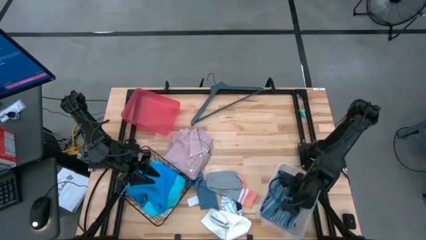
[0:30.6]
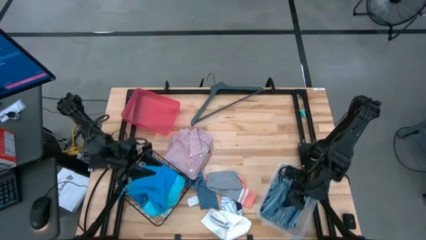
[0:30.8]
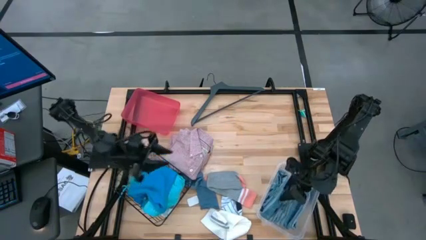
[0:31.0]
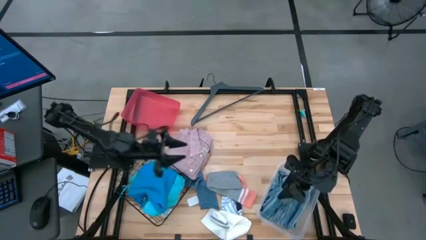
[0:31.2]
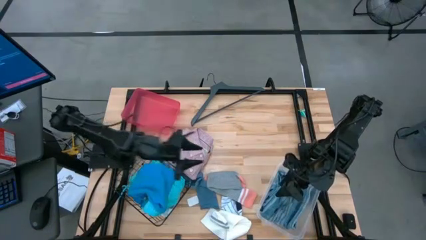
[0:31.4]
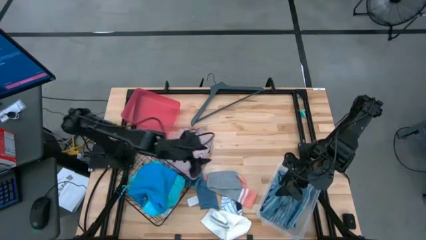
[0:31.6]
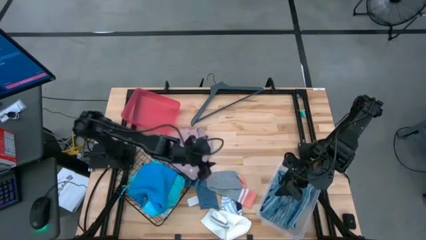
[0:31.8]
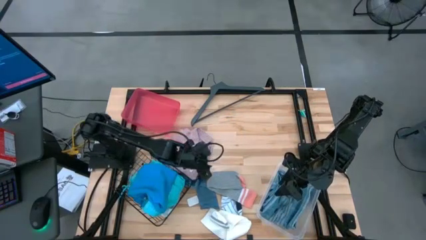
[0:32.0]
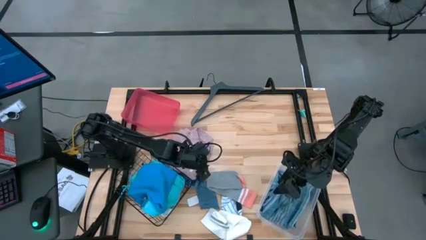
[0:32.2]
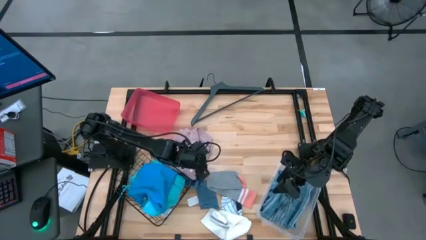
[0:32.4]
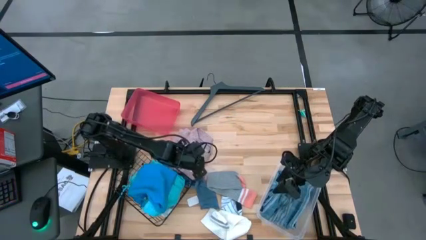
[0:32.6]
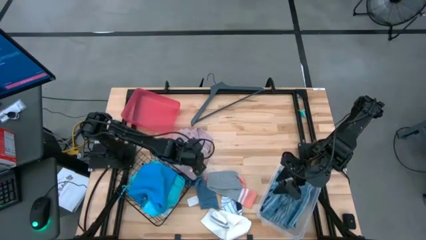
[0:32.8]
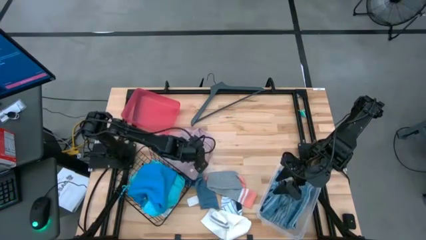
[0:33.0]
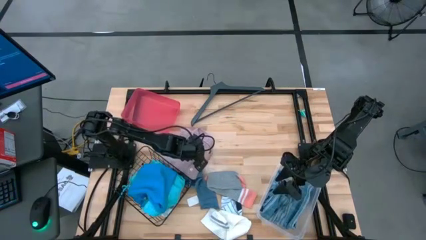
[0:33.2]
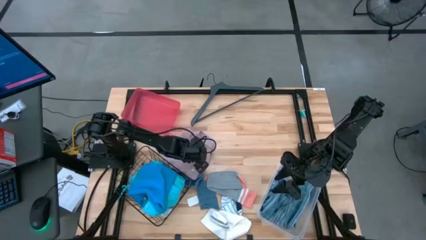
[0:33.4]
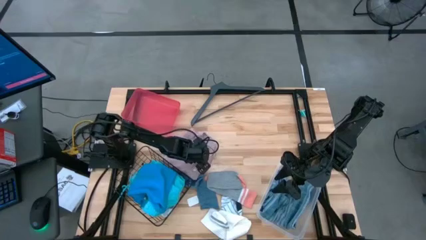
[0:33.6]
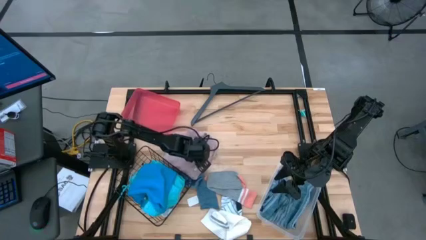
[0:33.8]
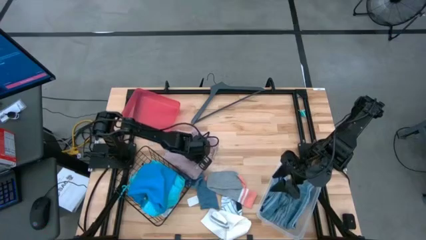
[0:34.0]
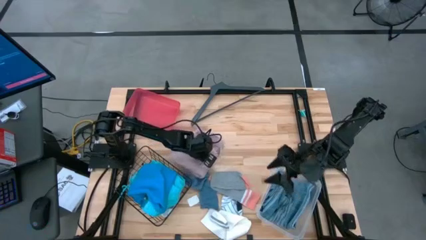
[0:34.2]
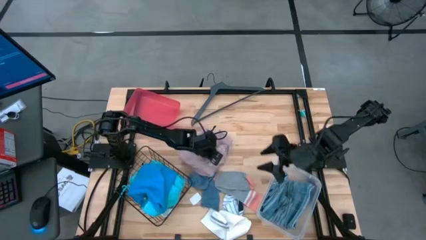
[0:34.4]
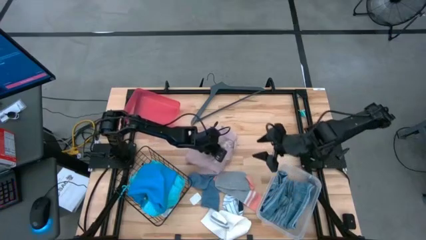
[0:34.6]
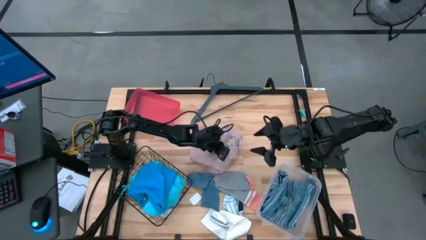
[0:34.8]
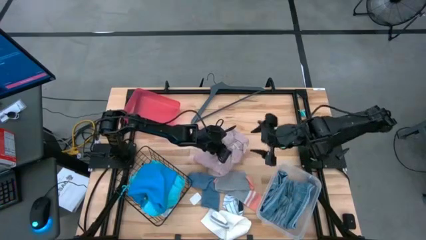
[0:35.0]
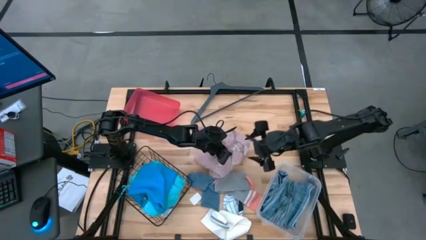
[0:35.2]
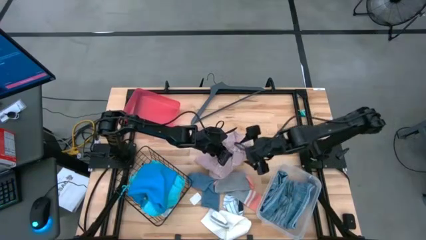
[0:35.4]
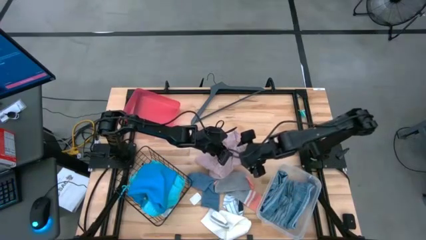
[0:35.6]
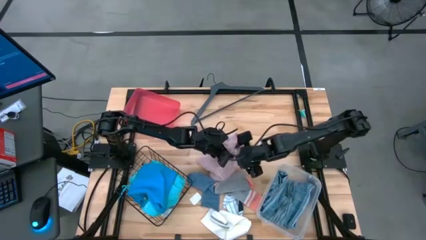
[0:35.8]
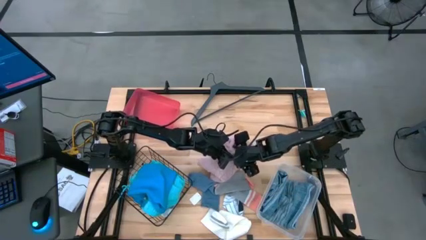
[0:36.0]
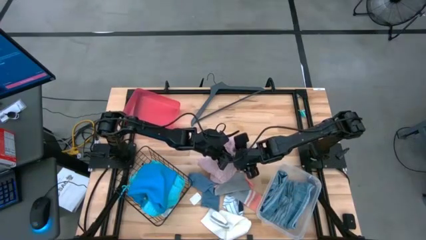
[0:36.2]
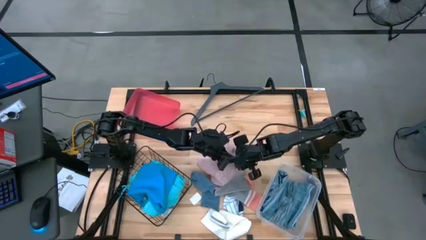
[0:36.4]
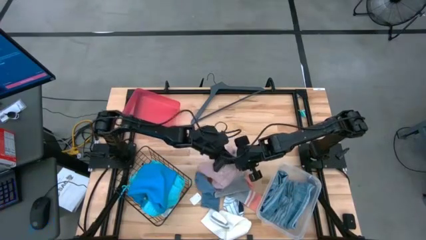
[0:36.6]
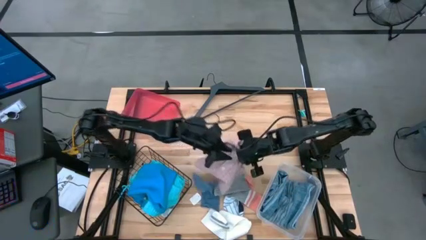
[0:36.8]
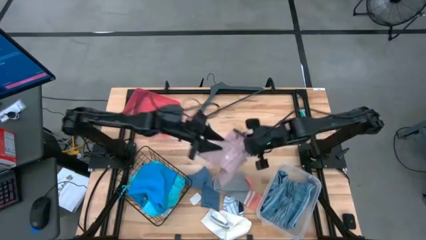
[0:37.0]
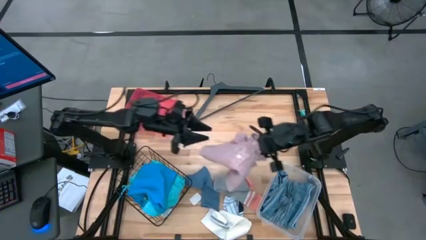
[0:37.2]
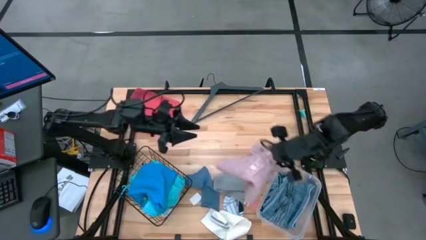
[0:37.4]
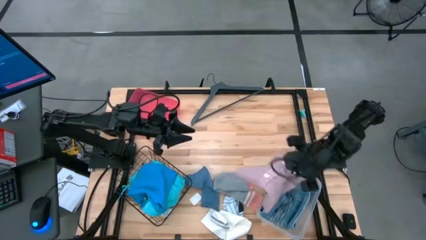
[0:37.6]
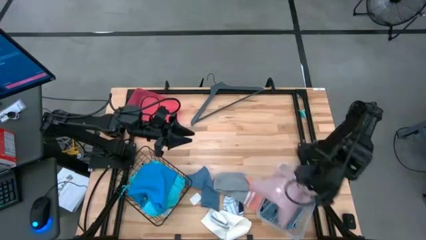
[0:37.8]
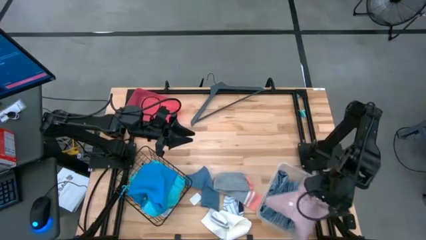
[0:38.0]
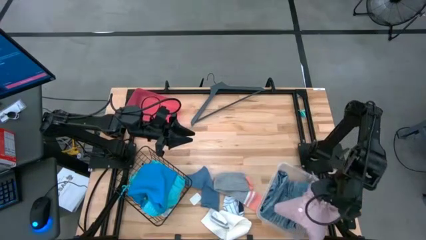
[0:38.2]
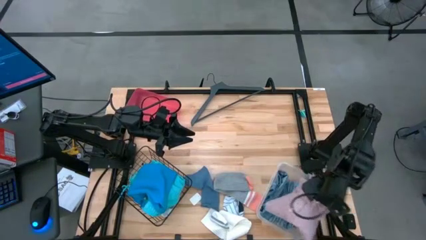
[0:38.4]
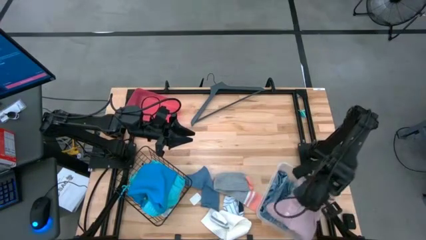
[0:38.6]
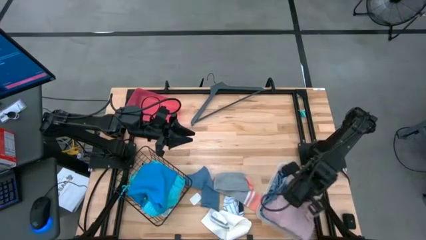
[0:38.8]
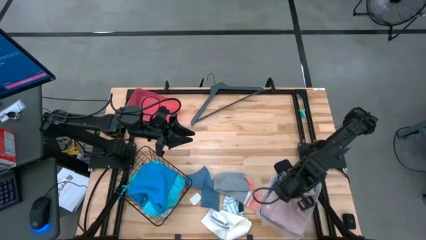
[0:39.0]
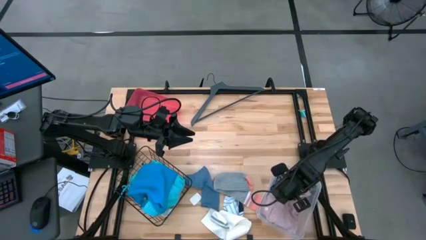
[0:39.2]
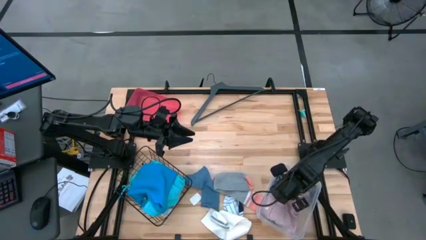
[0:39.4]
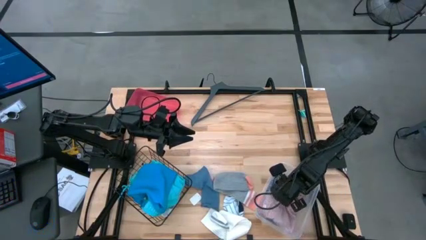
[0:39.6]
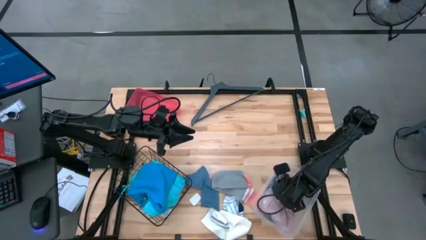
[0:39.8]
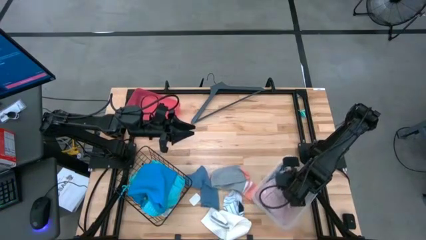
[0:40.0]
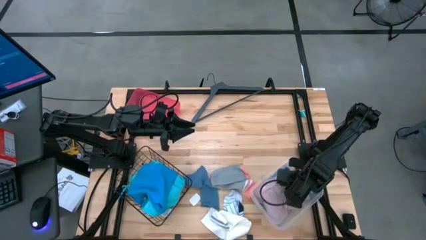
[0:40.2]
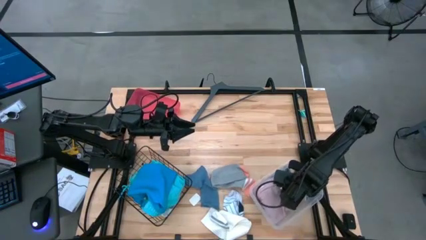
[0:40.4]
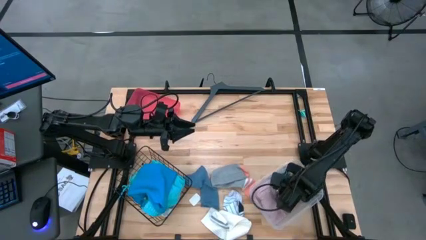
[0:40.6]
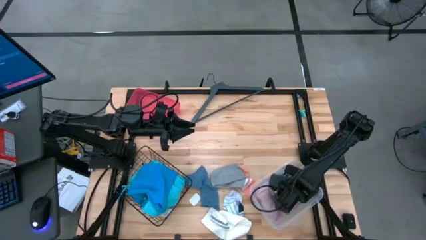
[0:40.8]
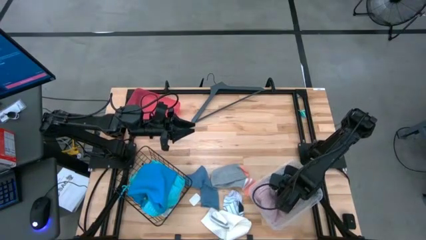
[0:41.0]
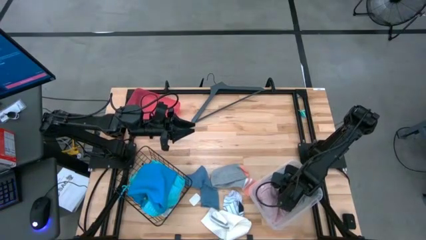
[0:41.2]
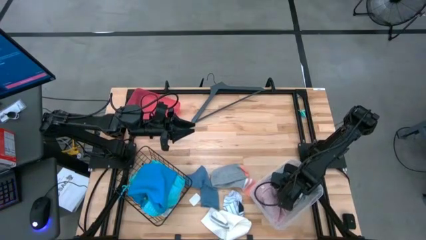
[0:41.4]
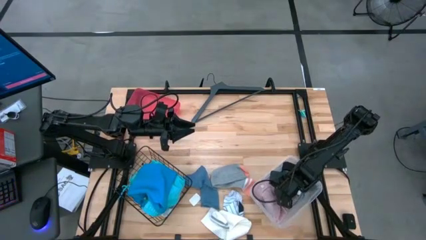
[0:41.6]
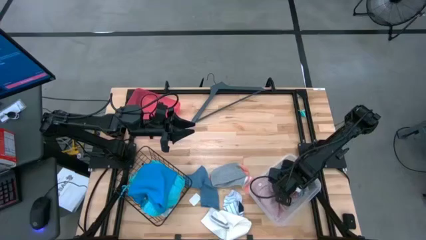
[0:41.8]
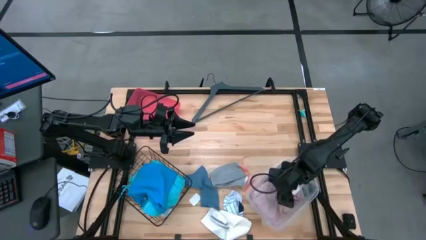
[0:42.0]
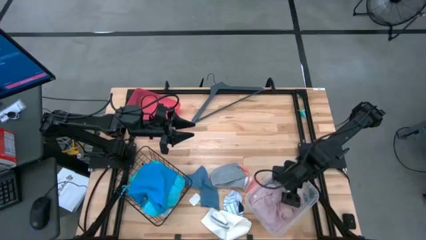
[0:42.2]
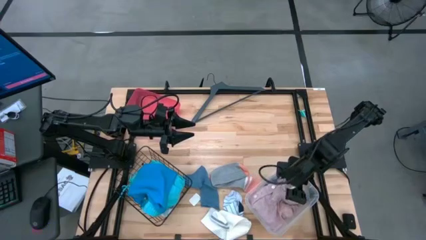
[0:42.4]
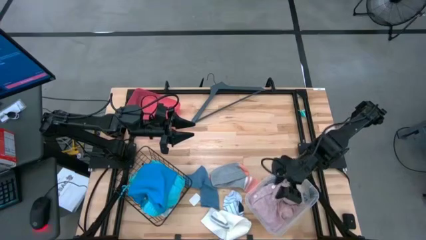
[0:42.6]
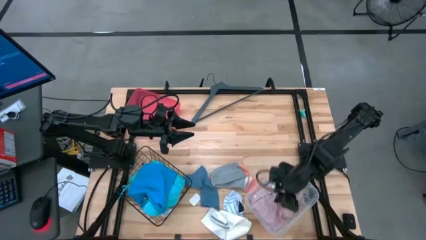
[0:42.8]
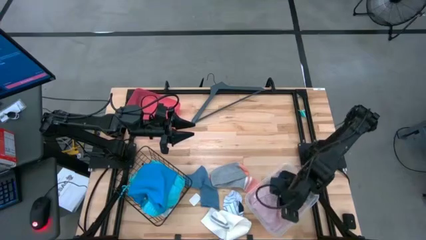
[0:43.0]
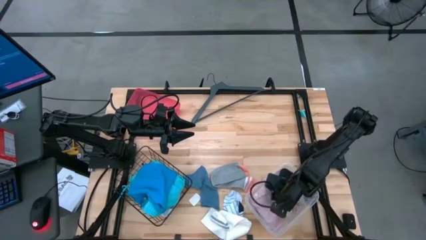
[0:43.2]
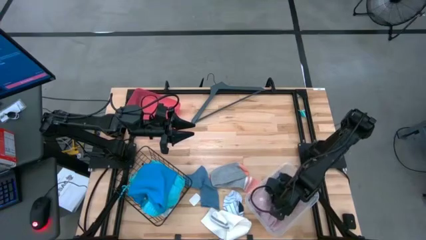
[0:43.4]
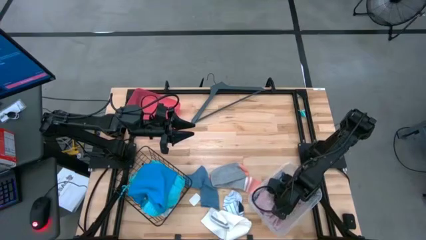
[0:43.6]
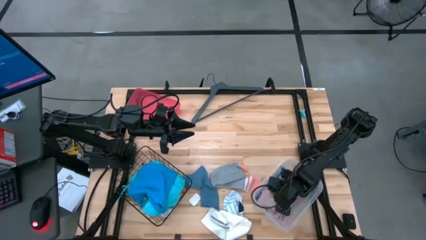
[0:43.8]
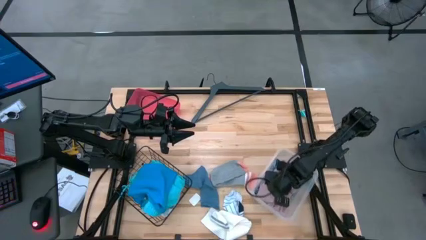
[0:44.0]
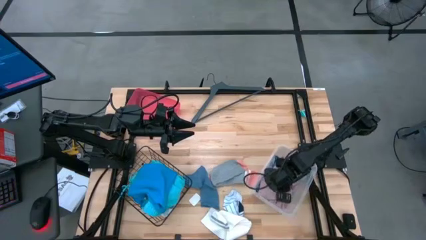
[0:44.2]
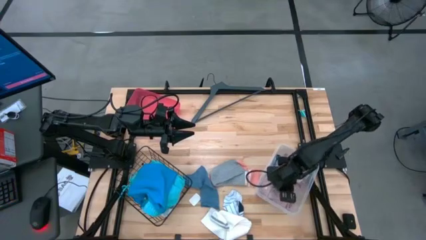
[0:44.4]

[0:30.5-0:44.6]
Task: Pick & Place Cloths
Put the pink polo into the transparent container

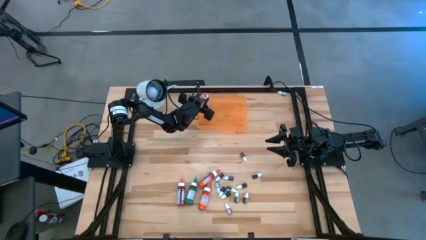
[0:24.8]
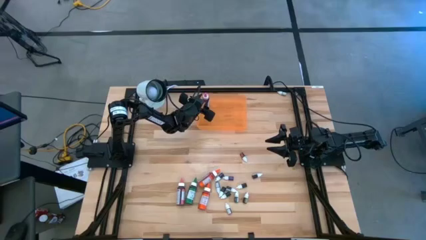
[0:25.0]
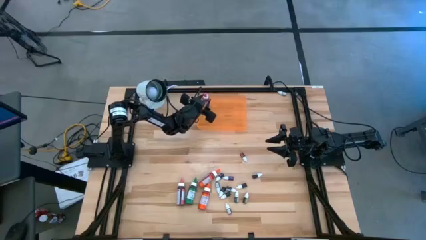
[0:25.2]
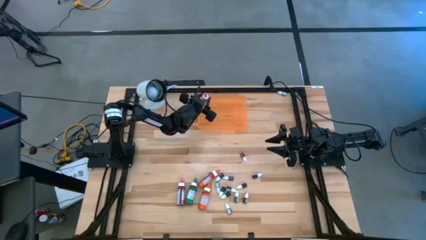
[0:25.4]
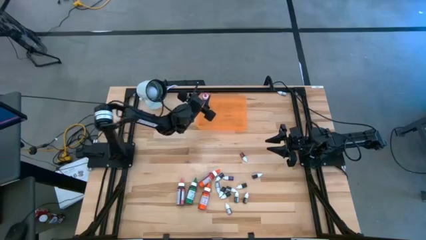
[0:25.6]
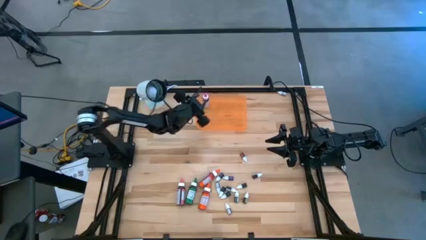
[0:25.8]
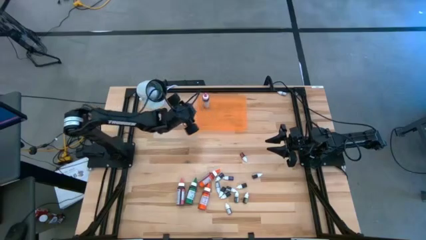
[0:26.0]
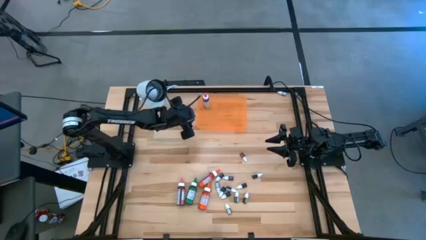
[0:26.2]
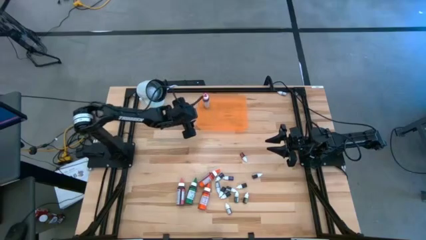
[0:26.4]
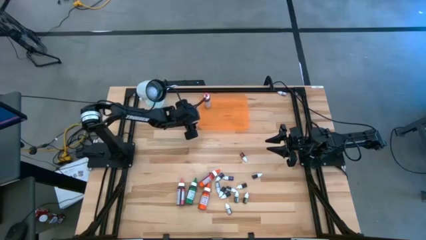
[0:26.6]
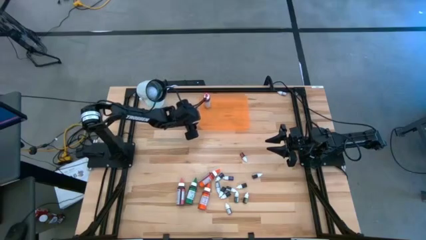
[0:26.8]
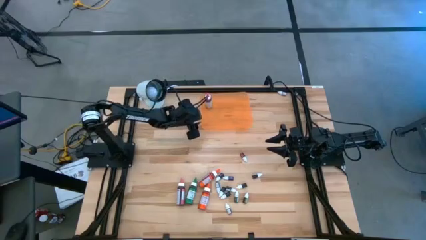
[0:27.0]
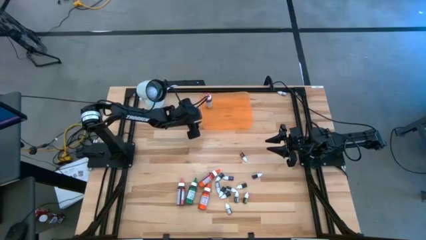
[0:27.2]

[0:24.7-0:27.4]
Task: Pick & Place food coloring
Adjust the orange bin
